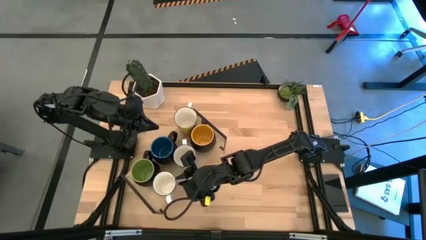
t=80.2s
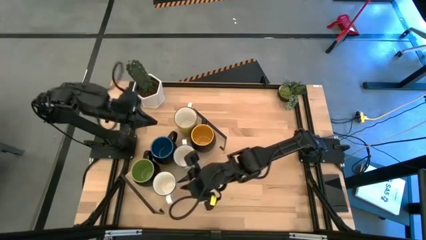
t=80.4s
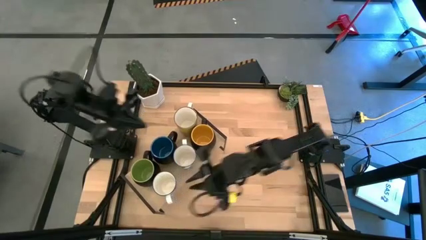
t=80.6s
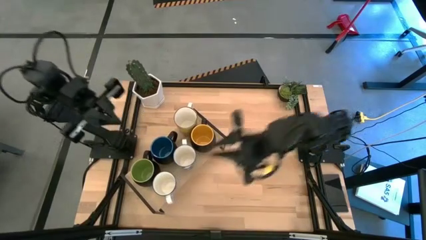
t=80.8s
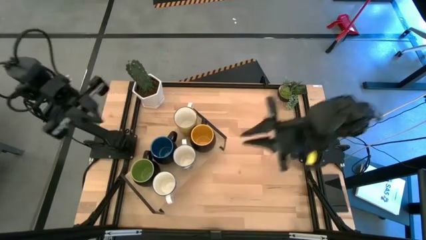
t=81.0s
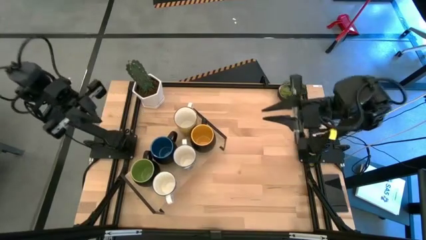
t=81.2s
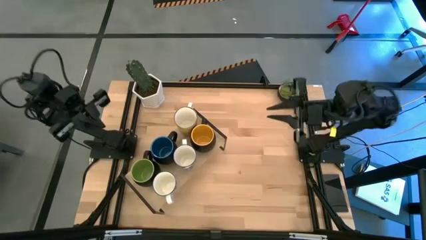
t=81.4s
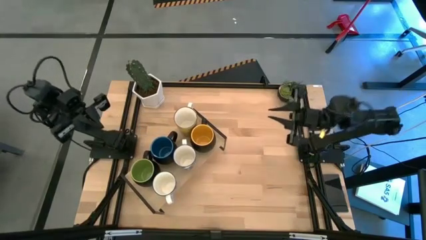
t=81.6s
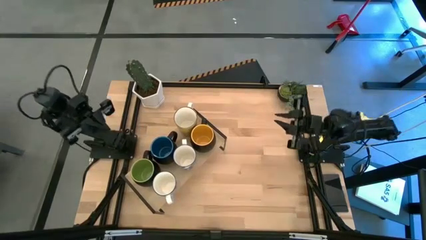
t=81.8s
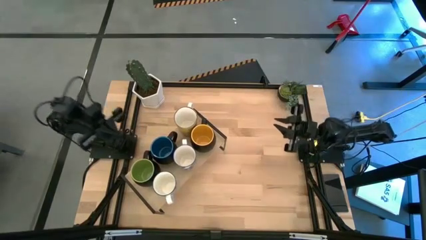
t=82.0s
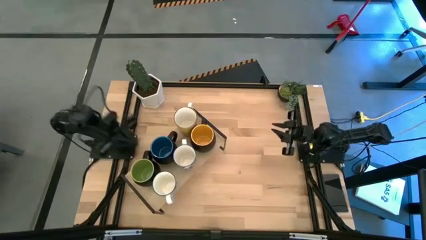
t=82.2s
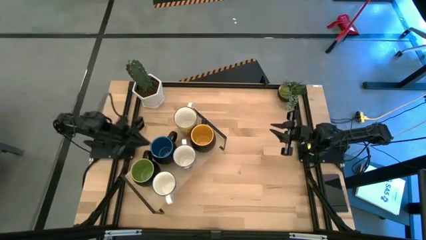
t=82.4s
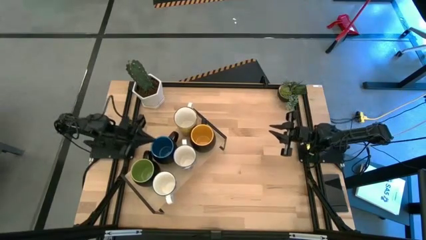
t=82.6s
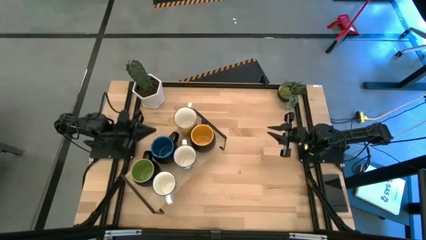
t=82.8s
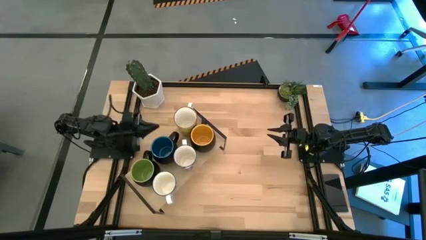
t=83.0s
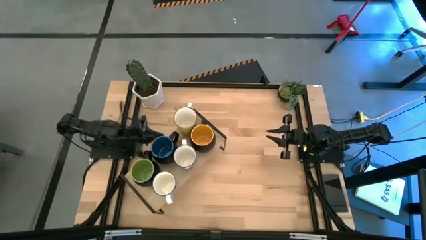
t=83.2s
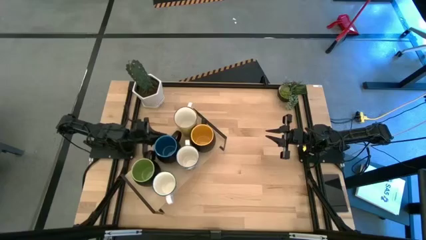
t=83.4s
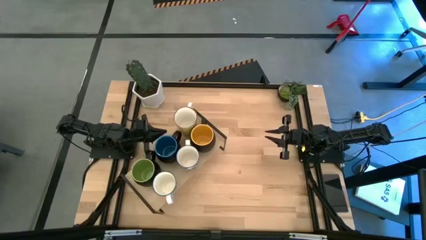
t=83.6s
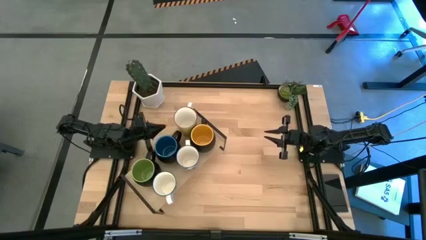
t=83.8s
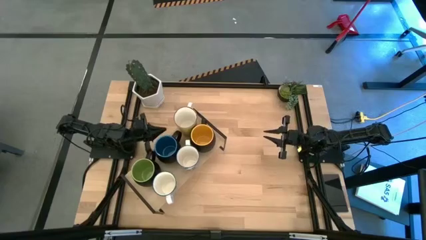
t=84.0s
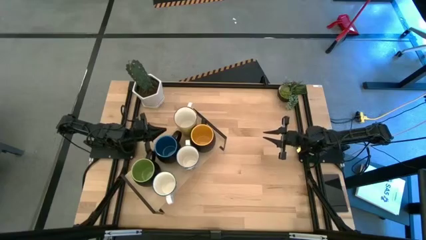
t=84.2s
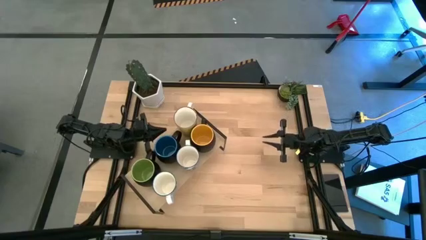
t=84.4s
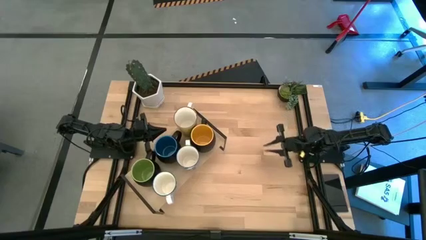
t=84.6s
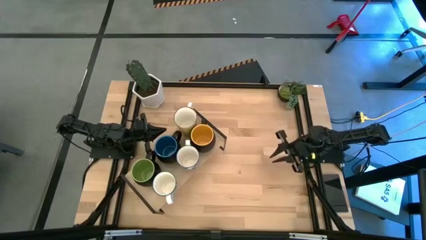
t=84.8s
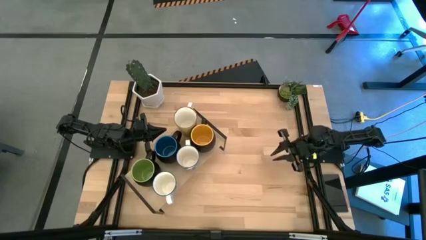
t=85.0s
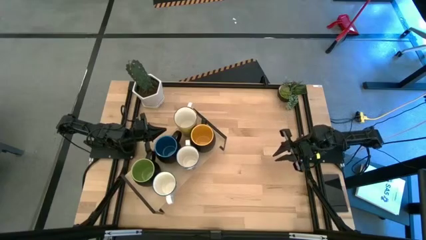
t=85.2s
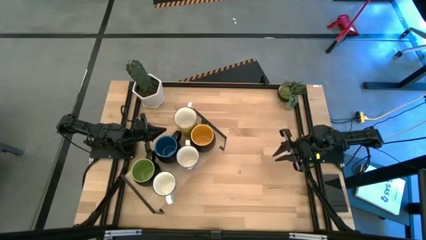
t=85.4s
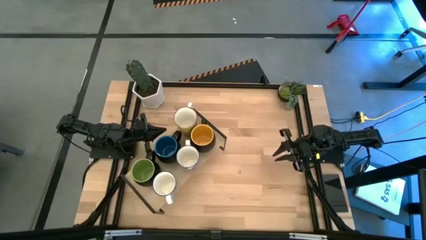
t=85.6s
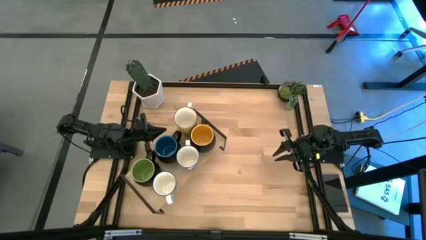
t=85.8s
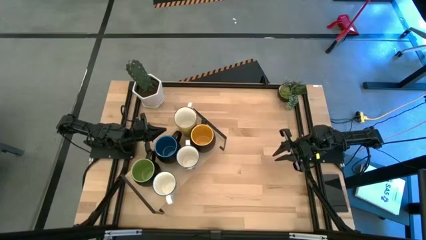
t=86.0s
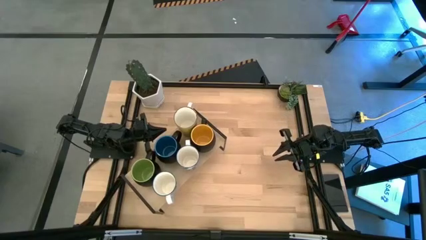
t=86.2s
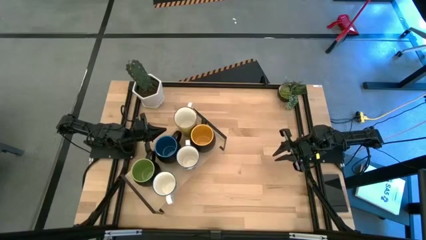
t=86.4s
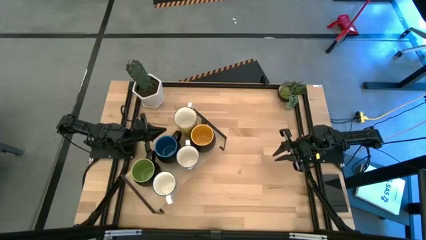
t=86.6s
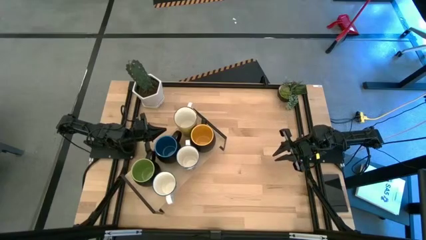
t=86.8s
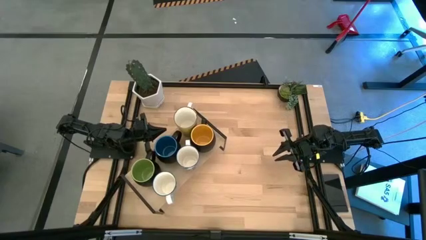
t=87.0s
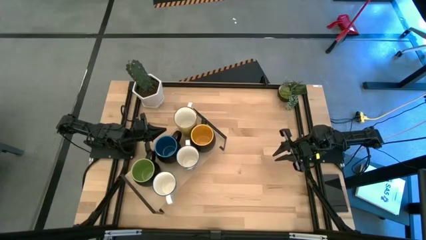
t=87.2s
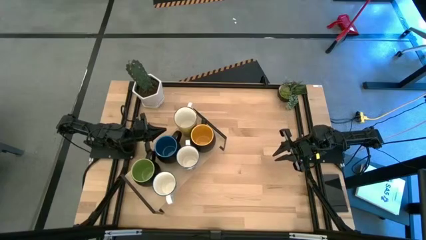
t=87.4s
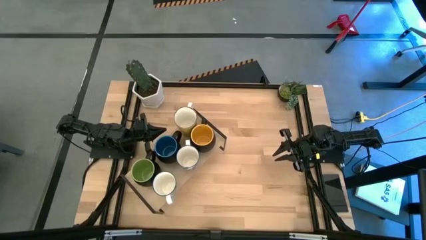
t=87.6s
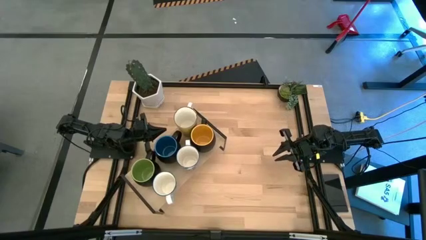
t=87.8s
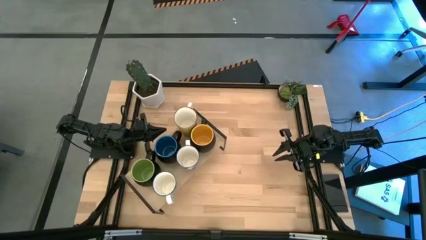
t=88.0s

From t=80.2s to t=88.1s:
Task: Place coffee mugs
Return to Home Position
